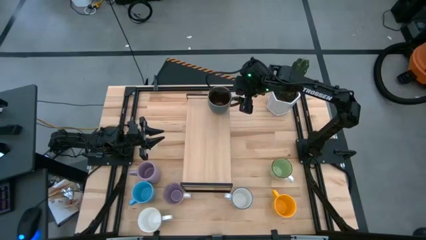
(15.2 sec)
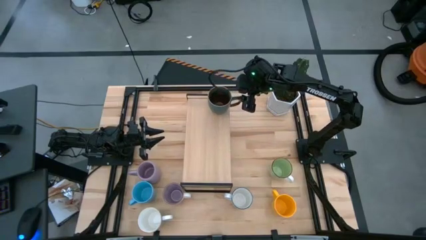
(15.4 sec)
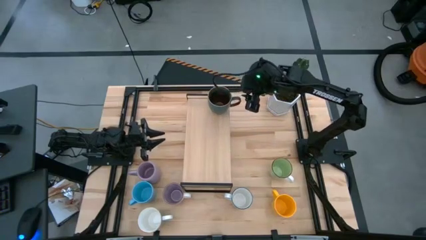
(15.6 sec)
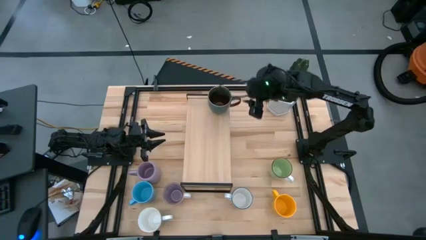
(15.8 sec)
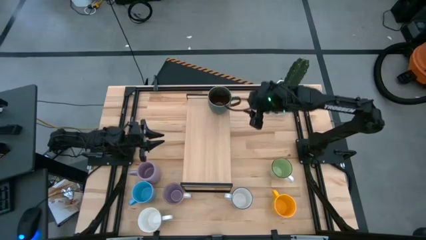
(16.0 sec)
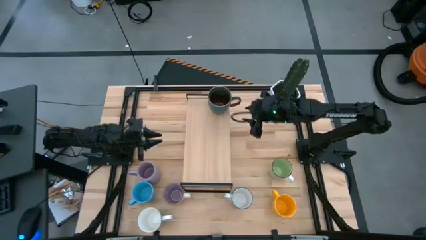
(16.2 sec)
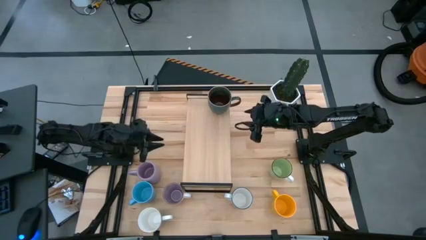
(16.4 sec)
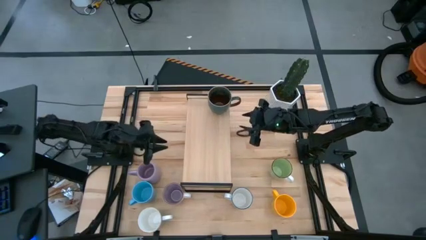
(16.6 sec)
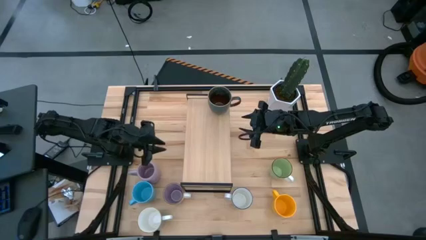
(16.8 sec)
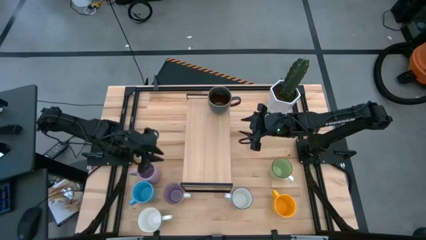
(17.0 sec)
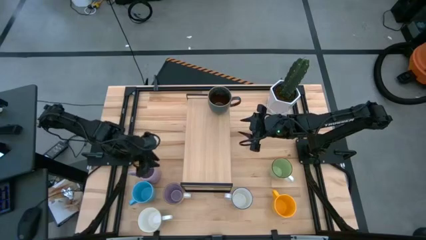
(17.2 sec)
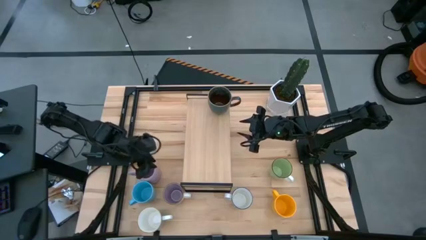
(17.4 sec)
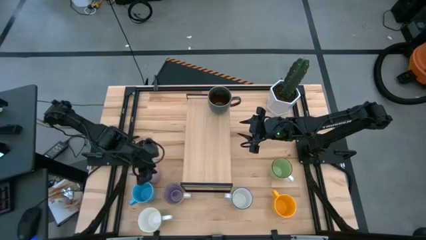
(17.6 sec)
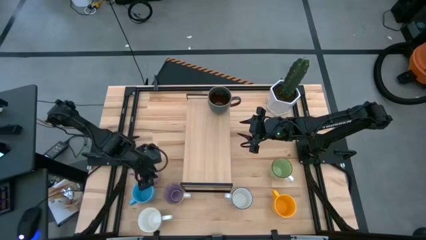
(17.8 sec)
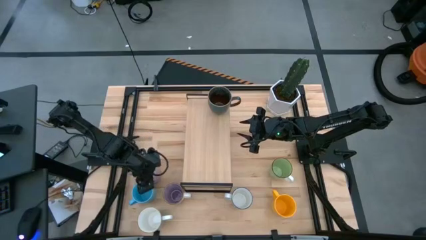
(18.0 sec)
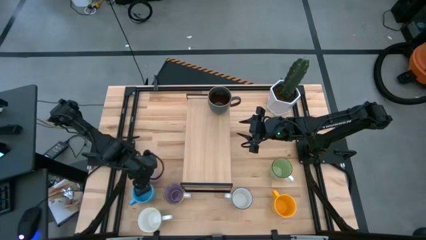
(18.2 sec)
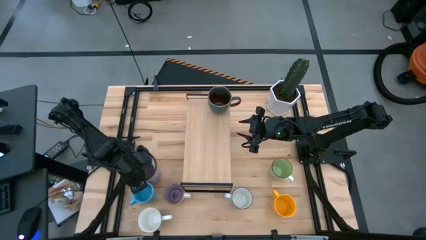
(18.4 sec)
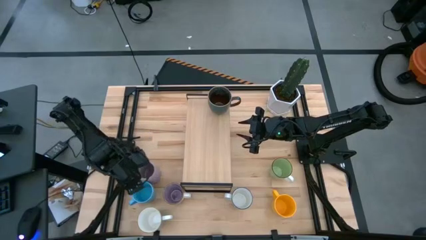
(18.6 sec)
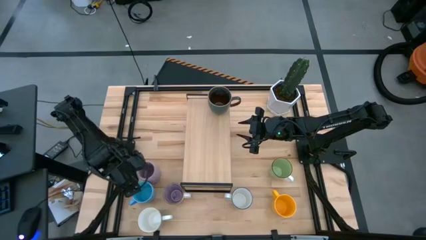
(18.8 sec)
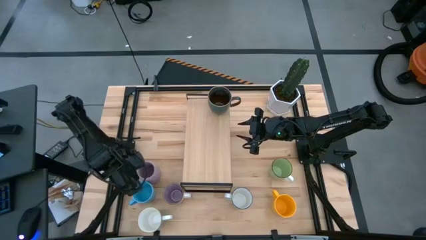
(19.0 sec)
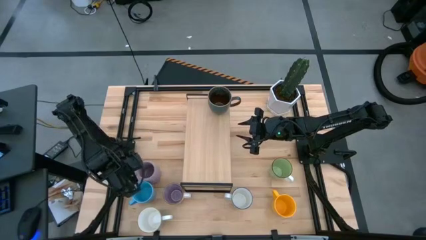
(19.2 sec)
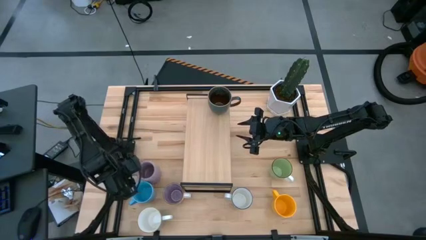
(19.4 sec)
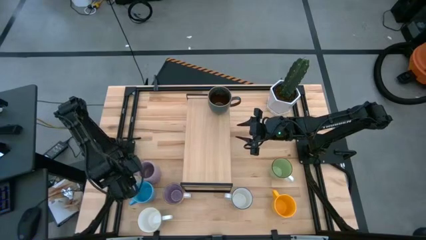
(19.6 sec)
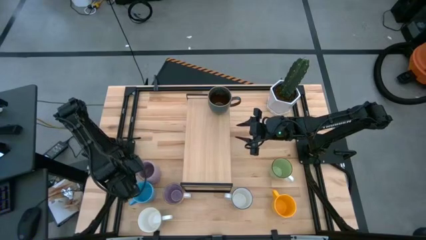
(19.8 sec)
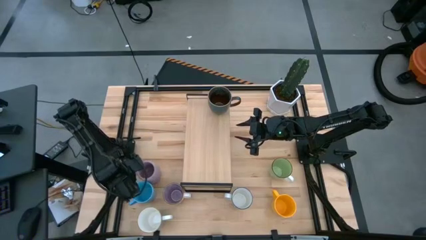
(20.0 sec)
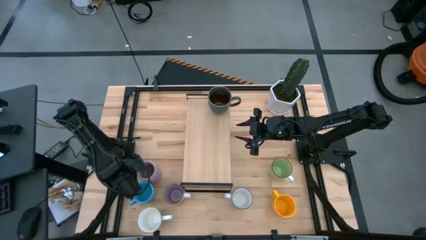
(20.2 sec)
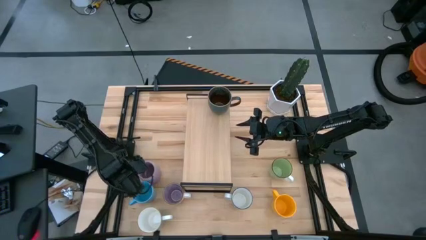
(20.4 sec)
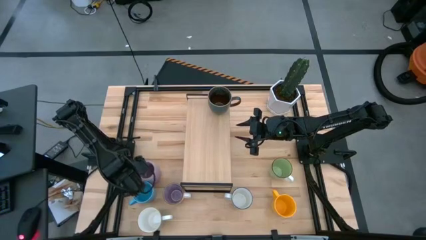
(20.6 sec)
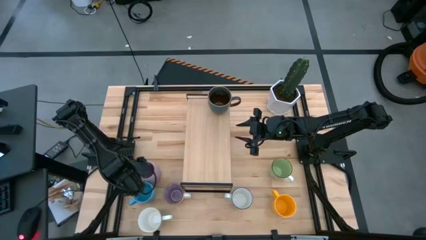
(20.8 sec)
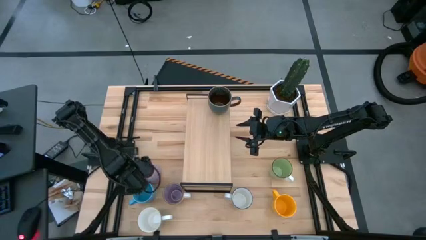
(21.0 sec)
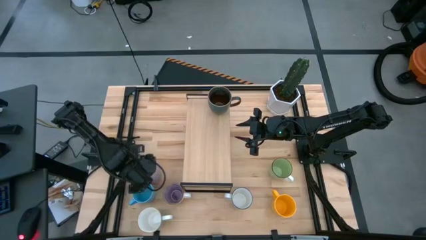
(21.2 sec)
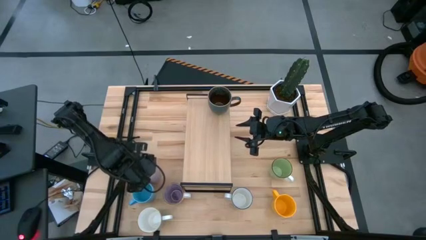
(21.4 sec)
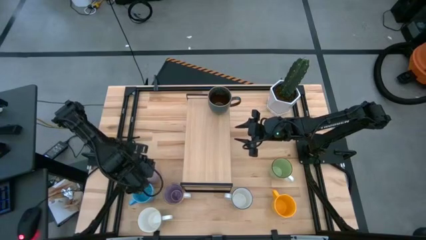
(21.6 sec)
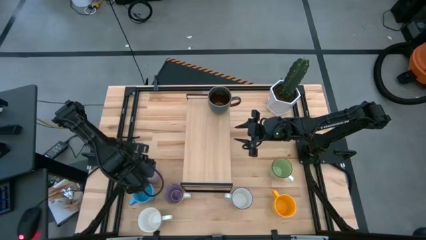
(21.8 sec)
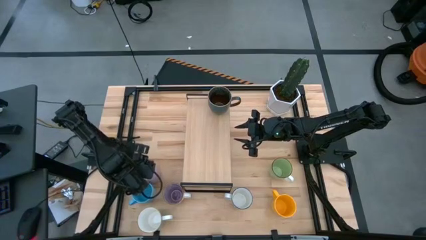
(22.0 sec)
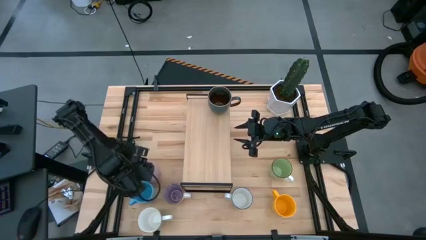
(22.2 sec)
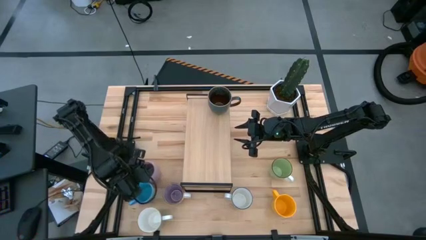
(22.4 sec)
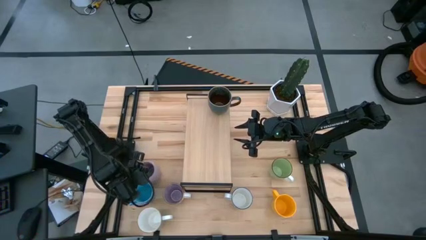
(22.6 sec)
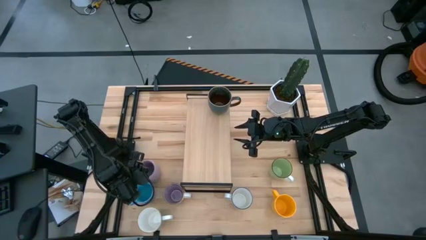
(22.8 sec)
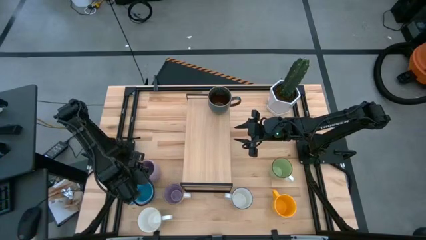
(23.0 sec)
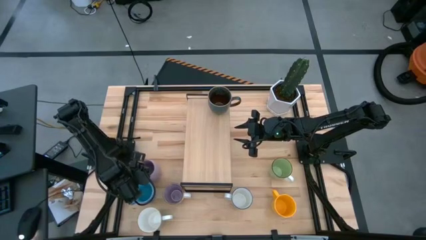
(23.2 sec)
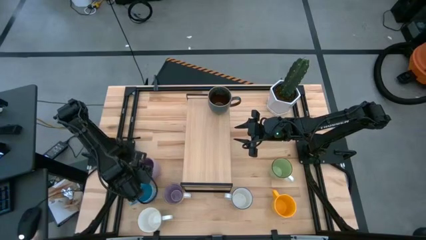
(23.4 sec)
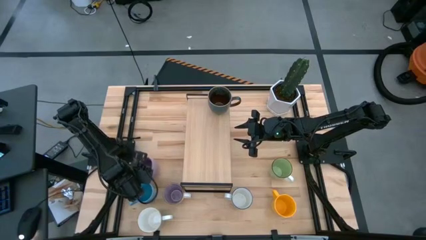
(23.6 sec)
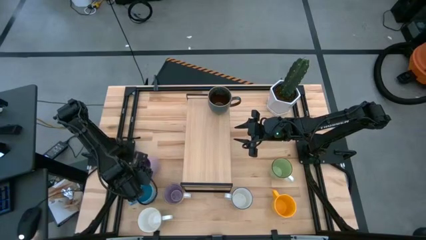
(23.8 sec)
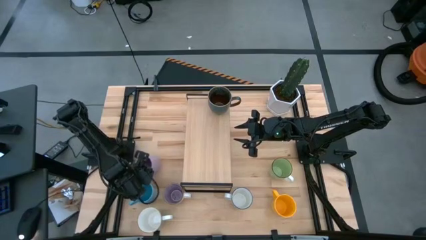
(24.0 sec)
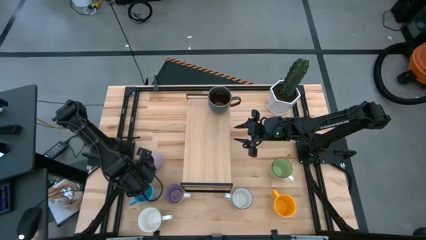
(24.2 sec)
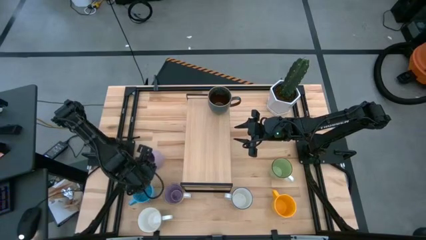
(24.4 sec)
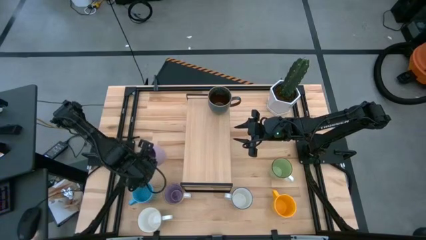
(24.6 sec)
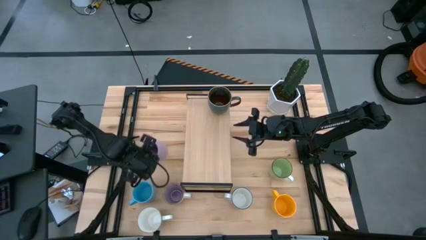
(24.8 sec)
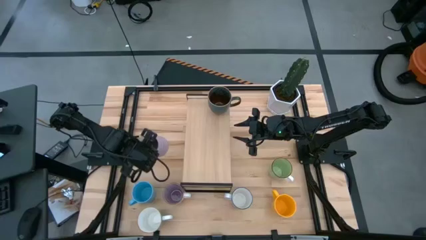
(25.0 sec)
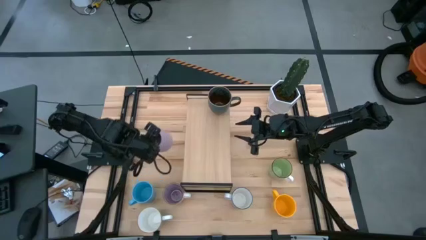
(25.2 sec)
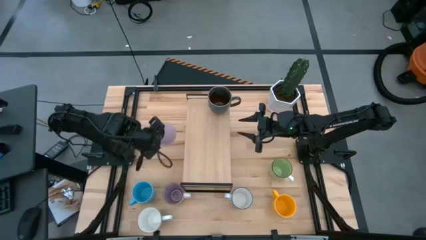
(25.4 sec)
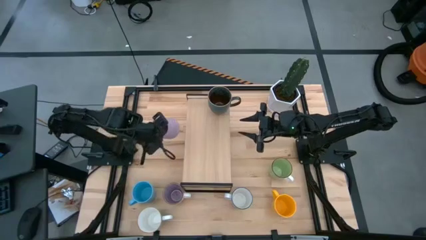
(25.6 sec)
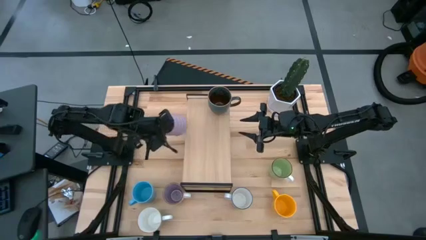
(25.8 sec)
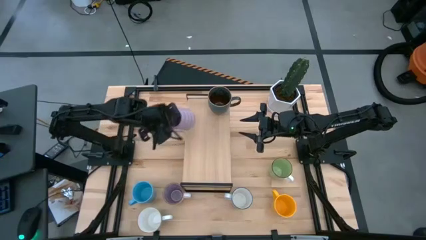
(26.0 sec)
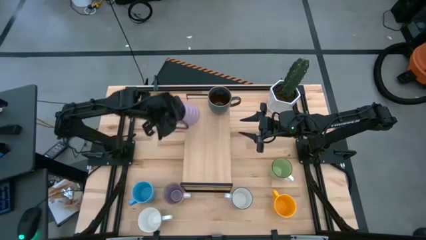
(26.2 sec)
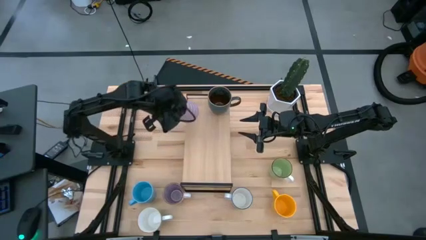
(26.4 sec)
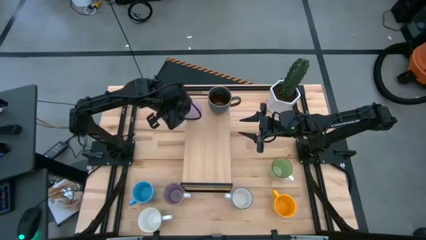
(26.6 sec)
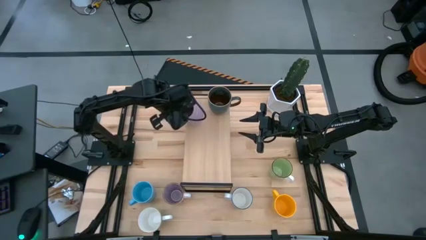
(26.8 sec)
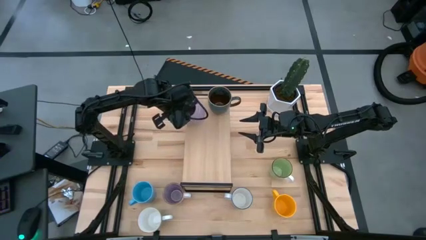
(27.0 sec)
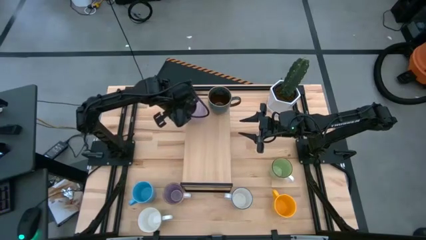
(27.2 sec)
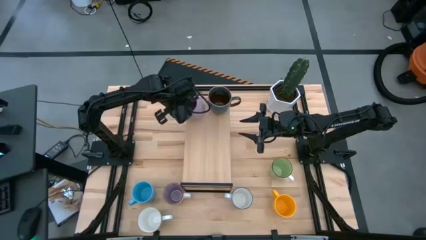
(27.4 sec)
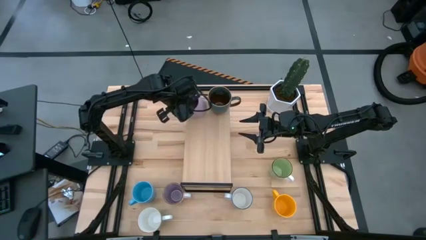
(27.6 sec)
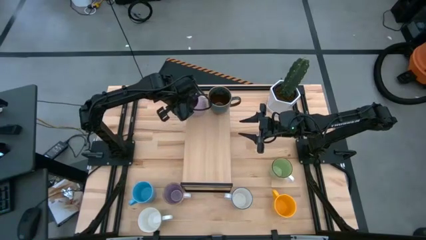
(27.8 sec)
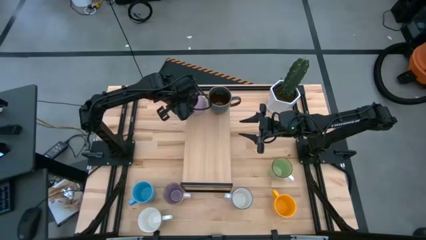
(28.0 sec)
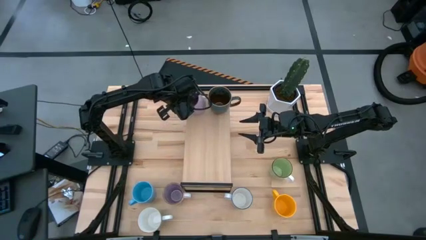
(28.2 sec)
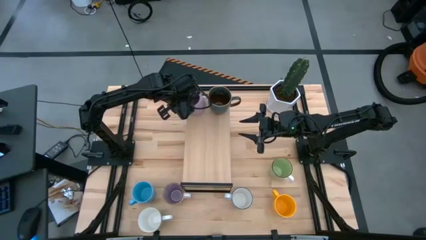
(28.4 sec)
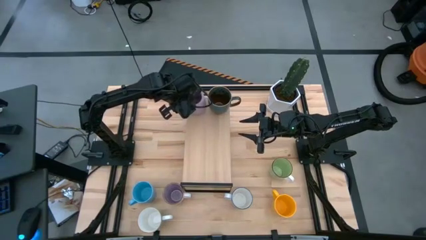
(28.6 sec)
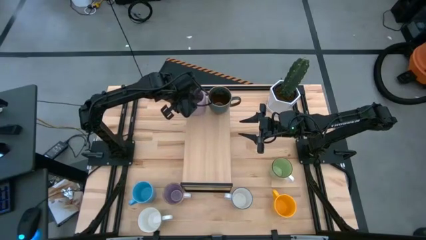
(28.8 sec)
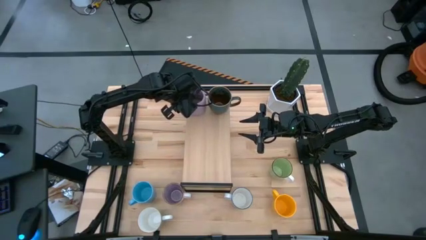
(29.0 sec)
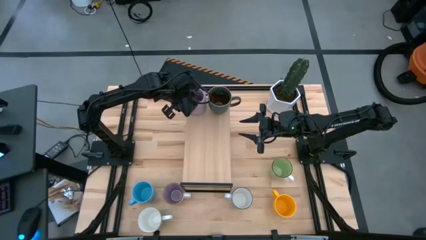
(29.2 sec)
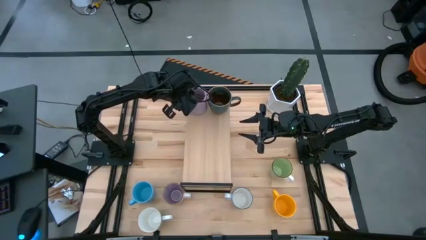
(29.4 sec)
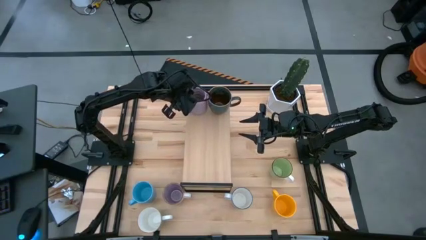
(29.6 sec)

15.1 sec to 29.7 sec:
Task: Place coffee mugs
Put the top purple mug on the shelf
